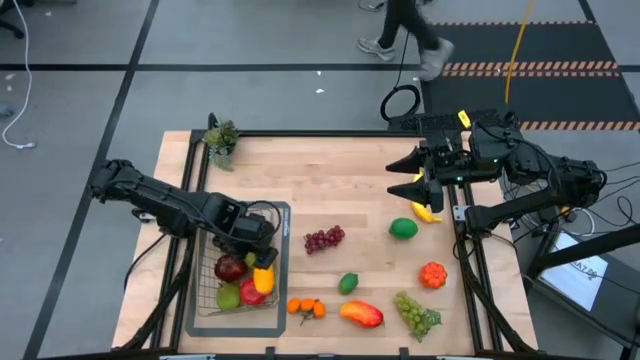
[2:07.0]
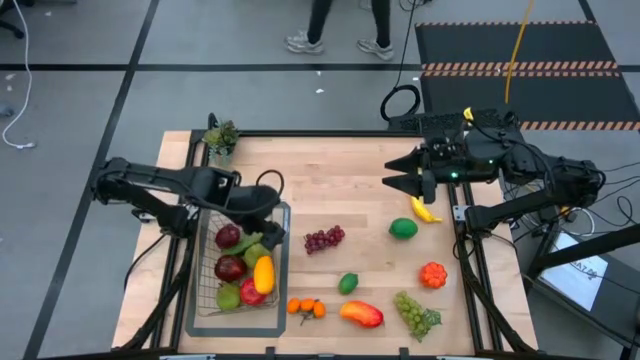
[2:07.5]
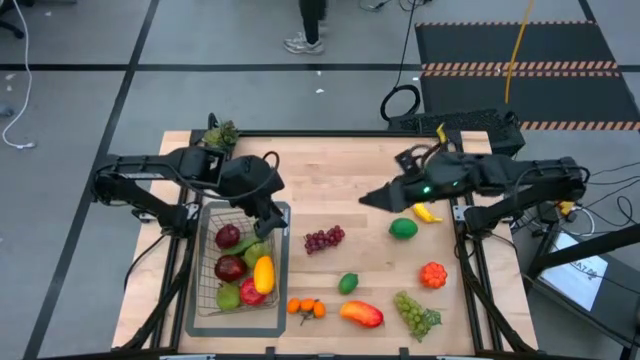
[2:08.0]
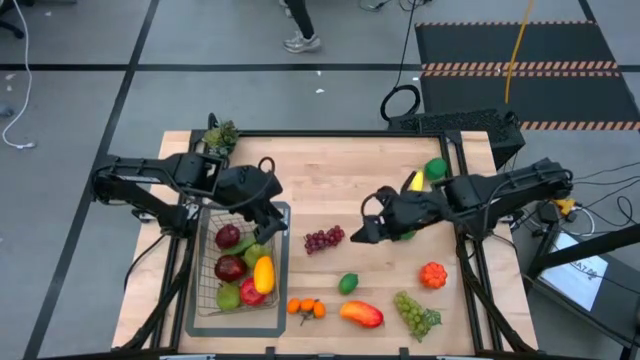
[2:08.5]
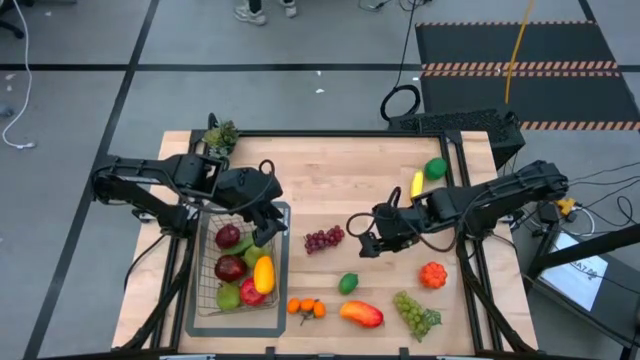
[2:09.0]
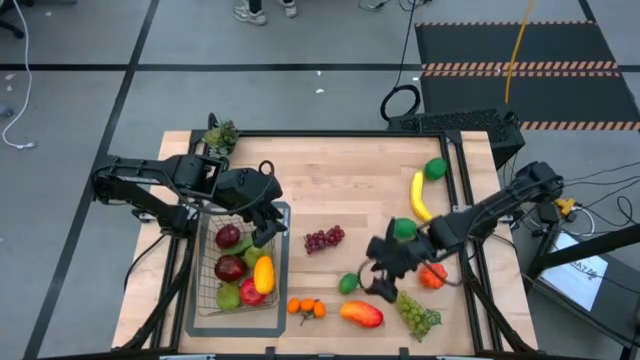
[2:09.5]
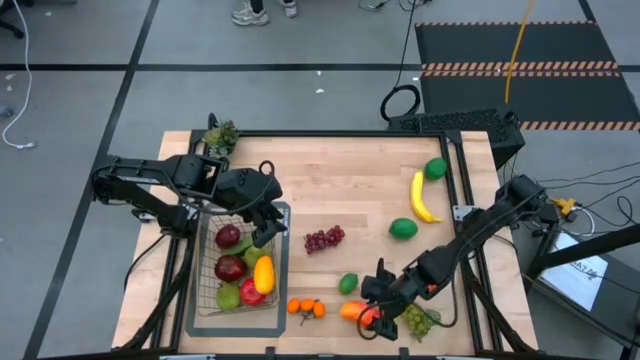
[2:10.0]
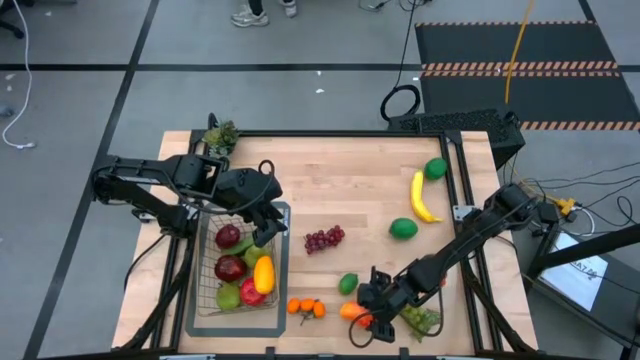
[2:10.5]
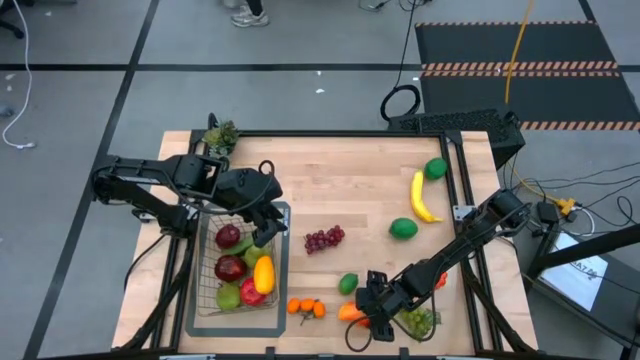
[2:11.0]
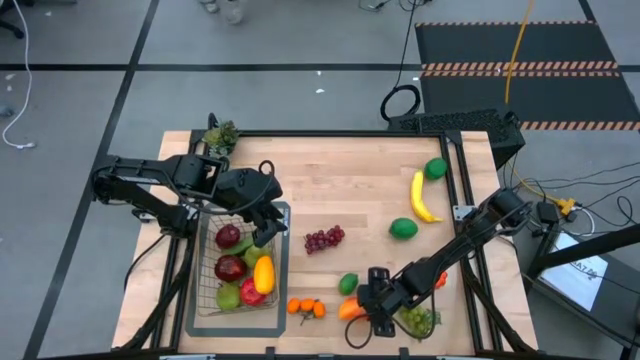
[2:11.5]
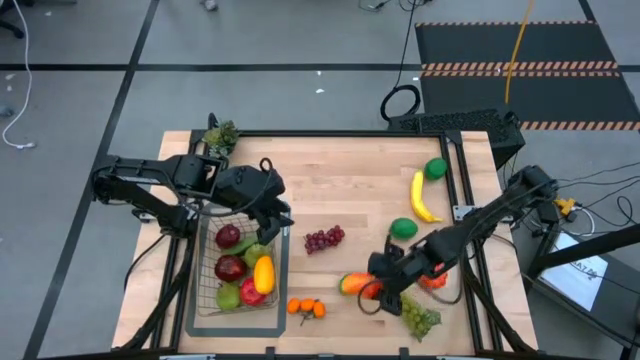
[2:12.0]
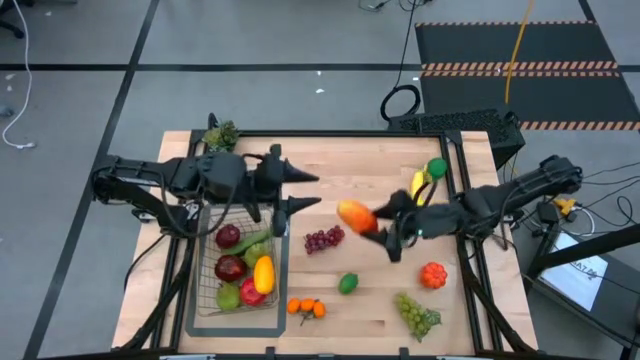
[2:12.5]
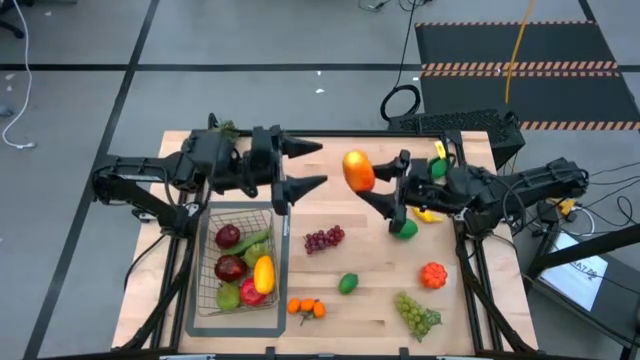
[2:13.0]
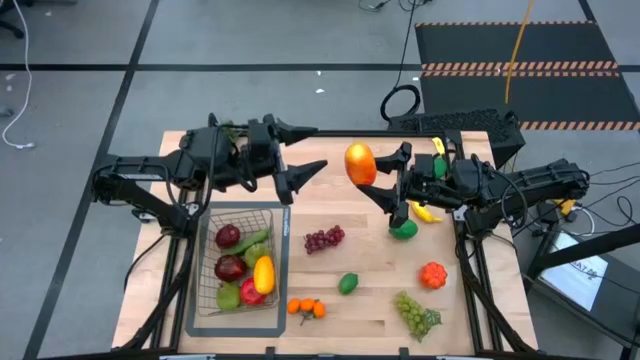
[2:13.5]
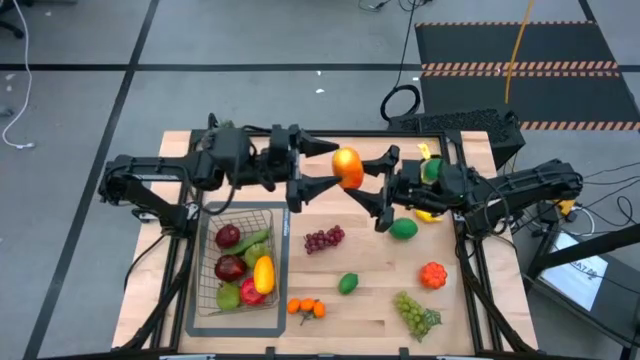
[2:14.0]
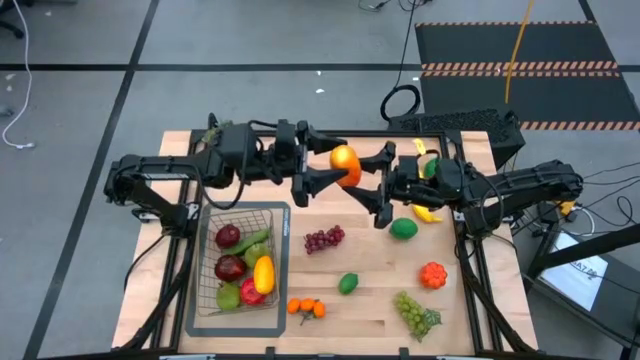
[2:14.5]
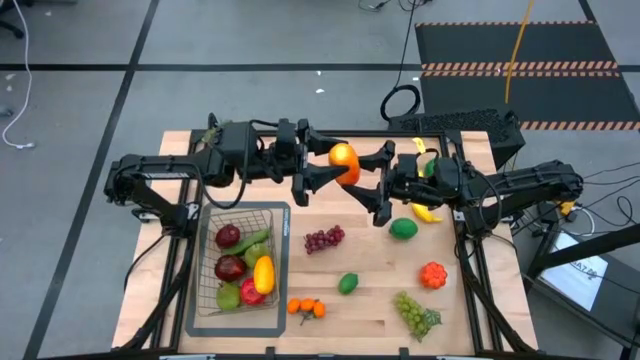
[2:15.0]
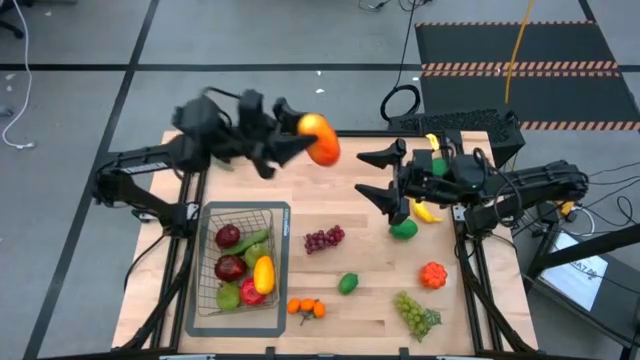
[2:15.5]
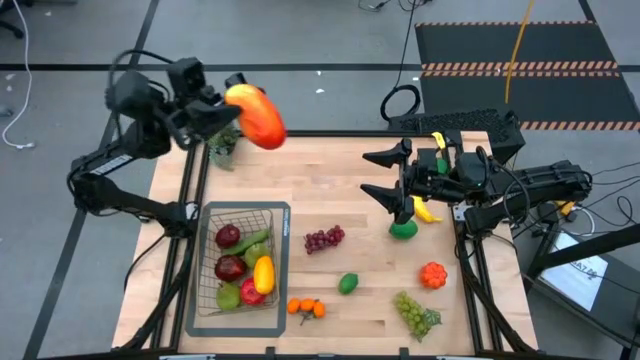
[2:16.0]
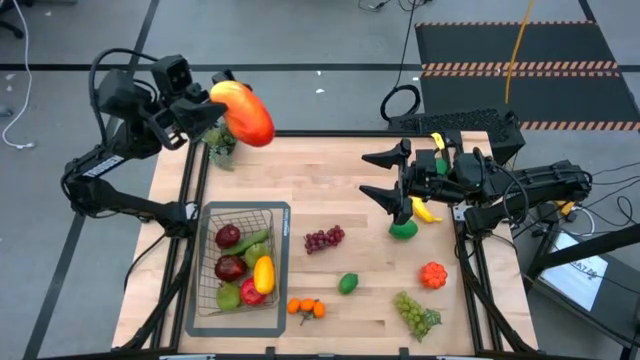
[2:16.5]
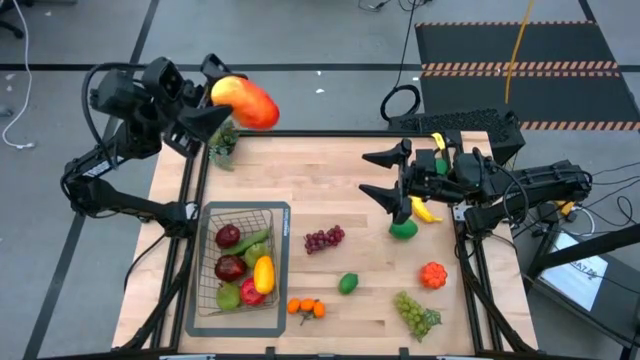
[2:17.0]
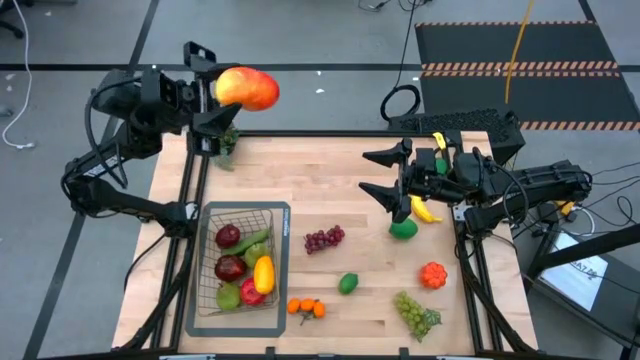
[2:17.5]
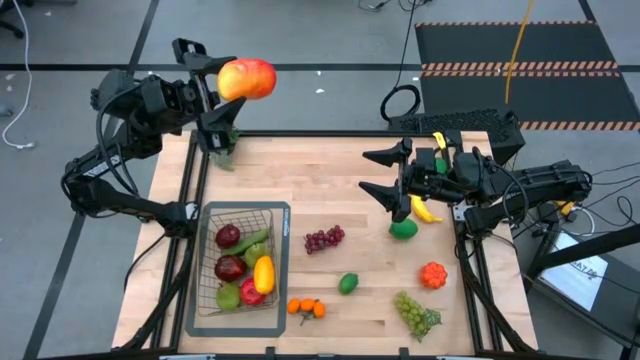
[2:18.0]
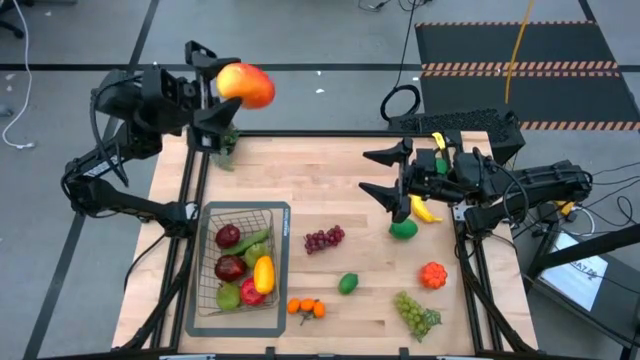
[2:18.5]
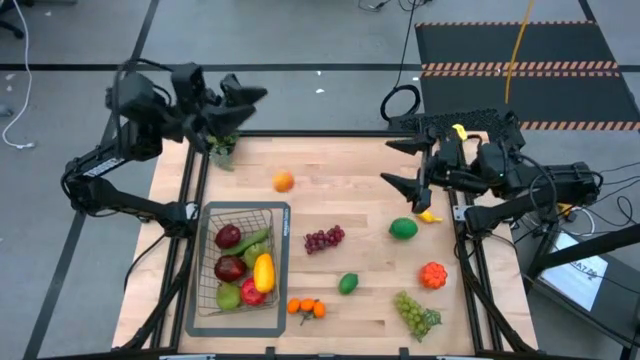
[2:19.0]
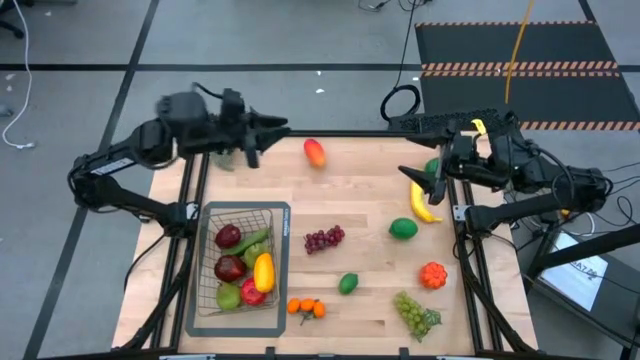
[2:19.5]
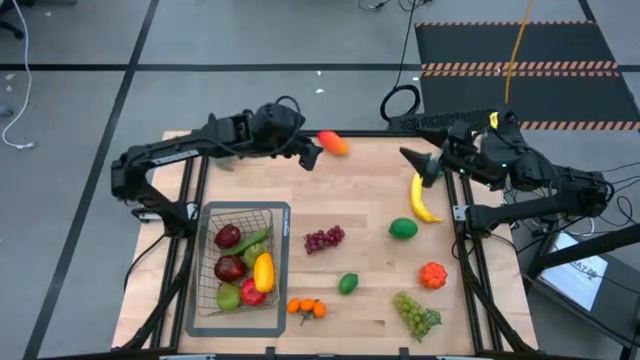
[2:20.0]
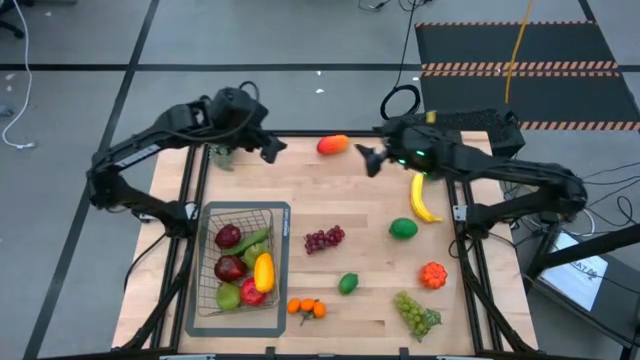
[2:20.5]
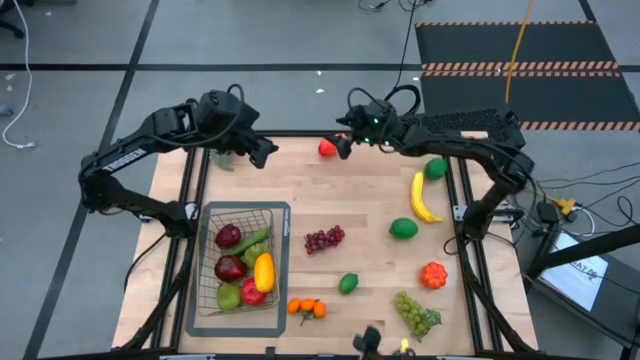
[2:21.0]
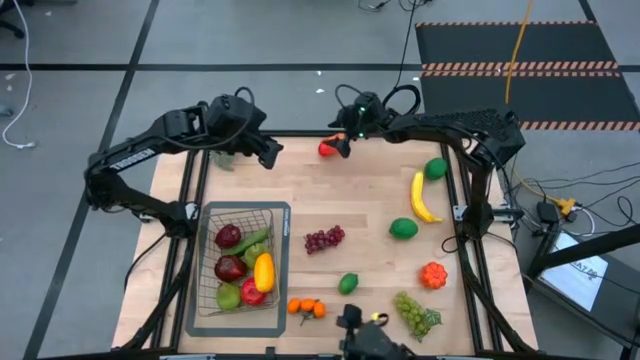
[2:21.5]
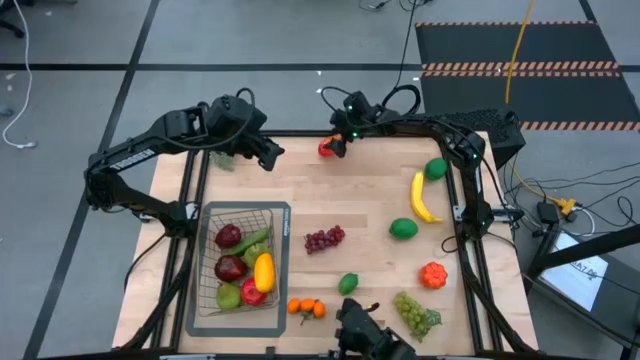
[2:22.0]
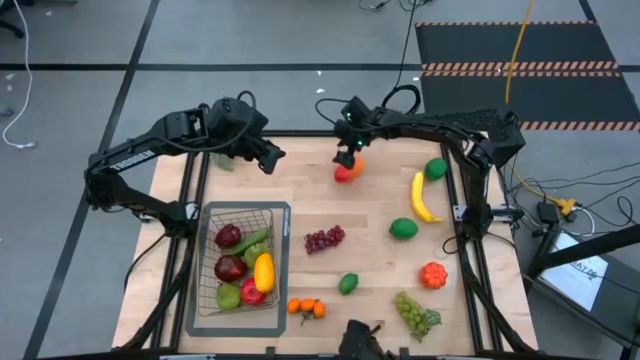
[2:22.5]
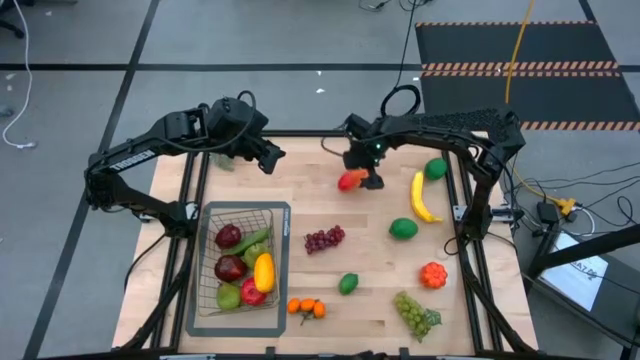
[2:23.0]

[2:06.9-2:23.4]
Task: Build produce basket
Put the orange mango into the wire basket

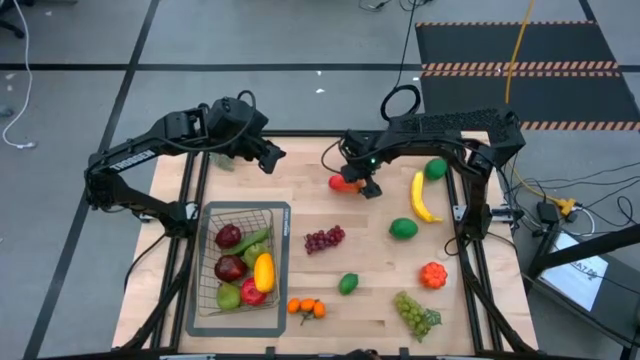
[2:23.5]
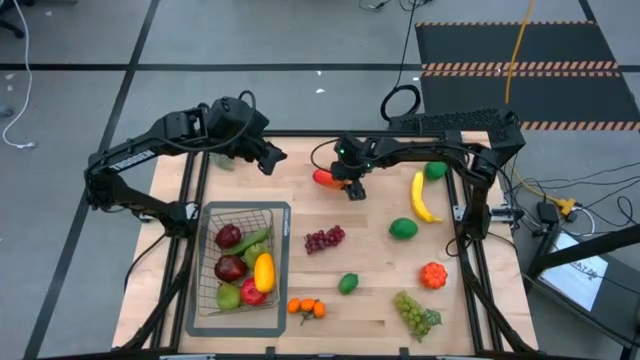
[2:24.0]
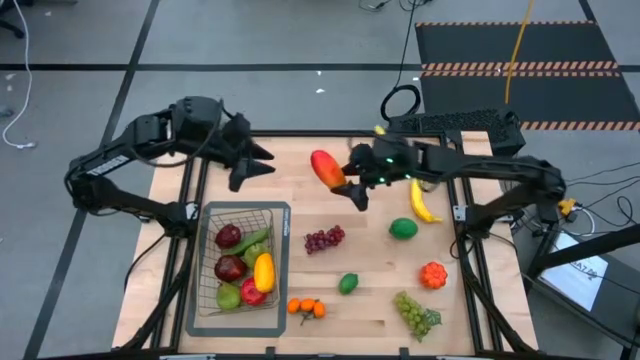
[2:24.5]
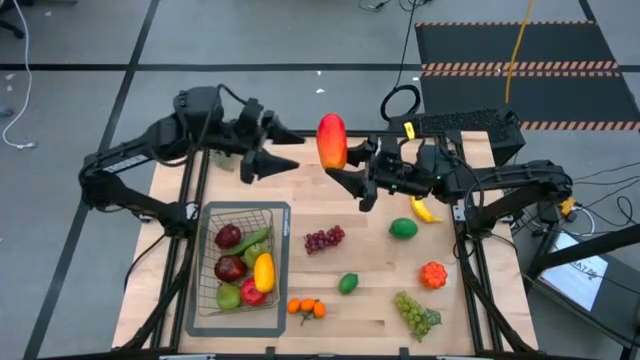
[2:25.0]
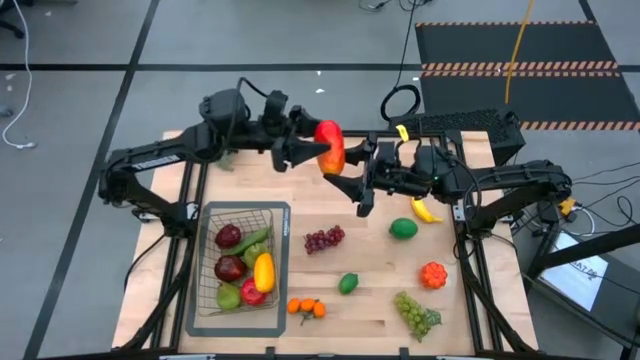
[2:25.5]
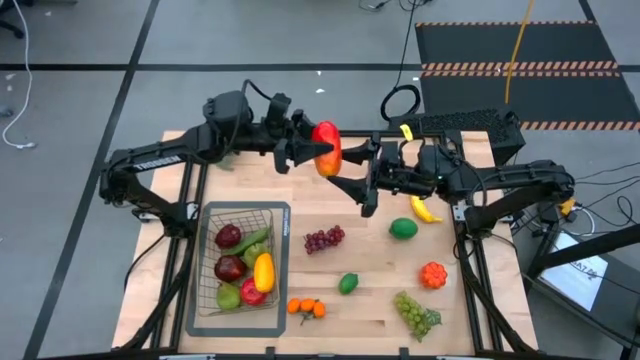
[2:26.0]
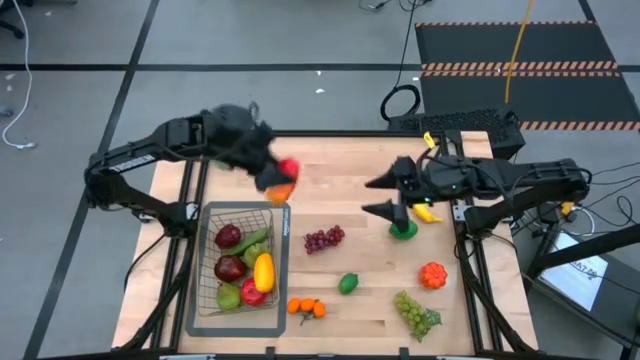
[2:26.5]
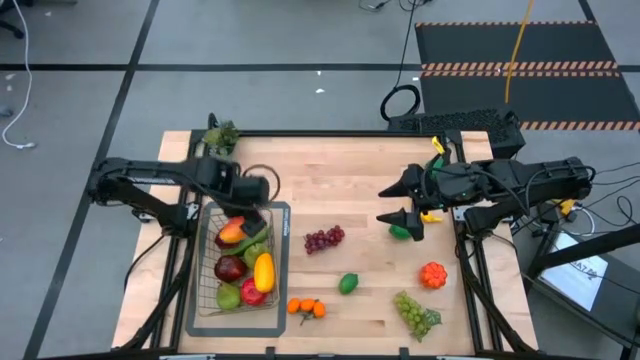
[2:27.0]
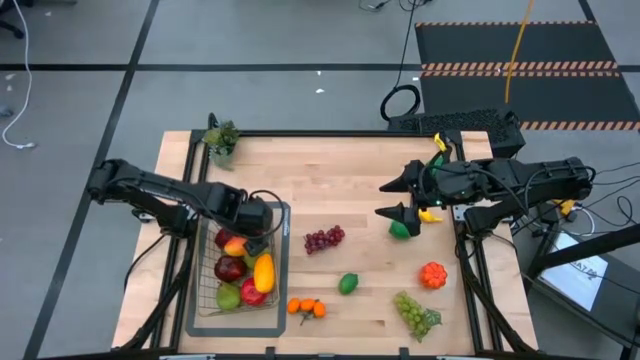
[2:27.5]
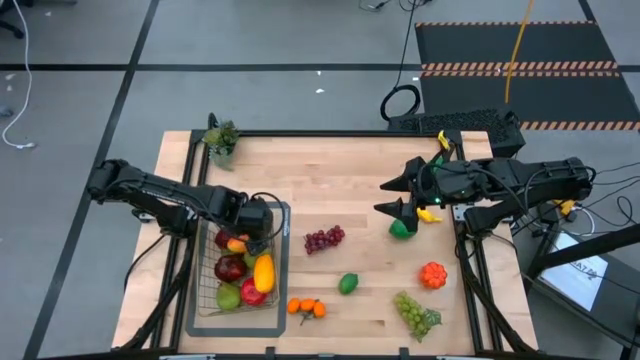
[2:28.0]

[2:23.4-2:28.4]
Put the orange mango into the wire basket
